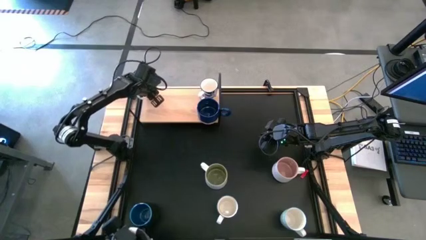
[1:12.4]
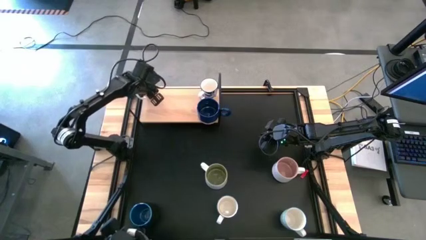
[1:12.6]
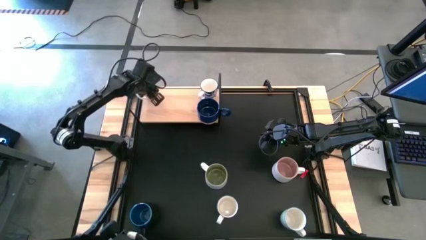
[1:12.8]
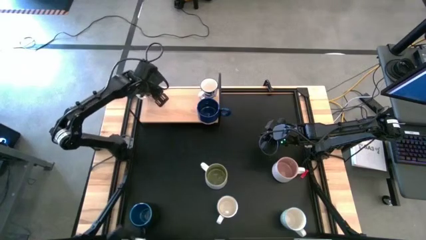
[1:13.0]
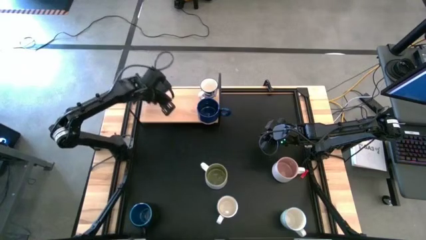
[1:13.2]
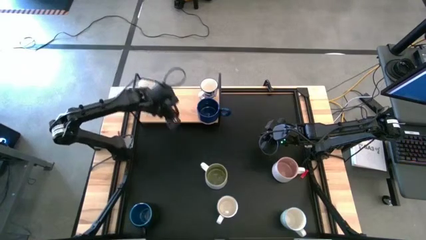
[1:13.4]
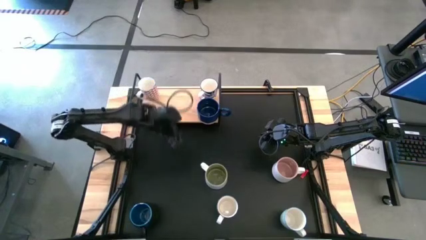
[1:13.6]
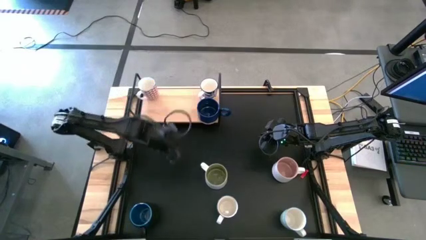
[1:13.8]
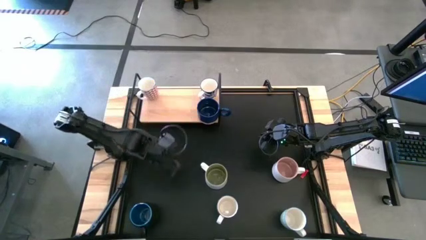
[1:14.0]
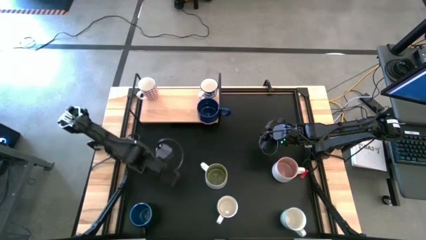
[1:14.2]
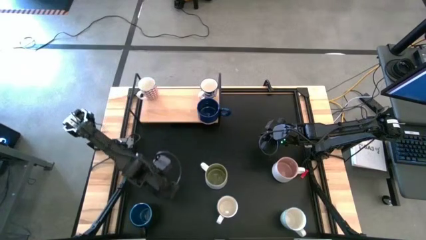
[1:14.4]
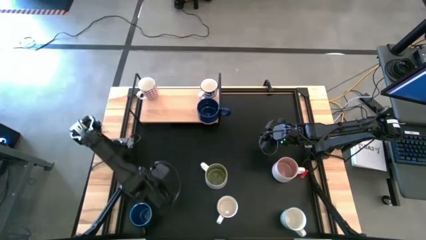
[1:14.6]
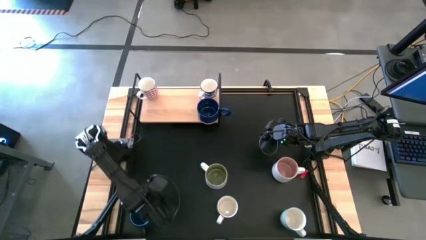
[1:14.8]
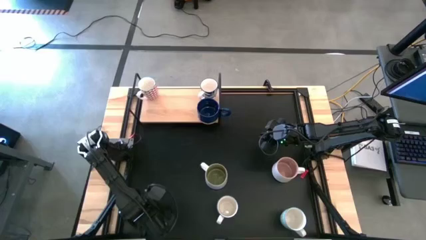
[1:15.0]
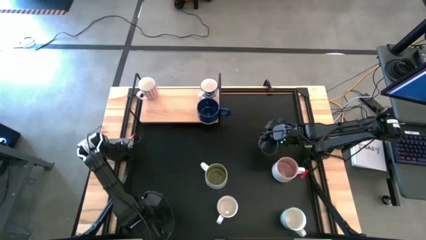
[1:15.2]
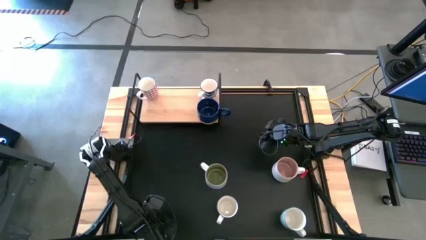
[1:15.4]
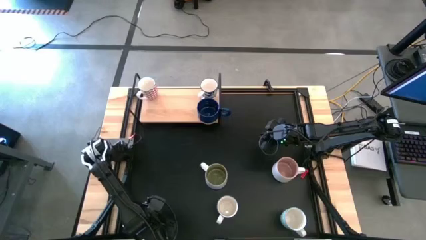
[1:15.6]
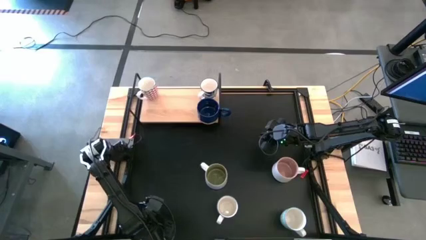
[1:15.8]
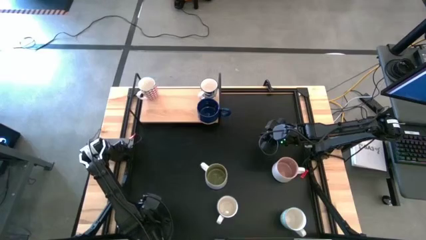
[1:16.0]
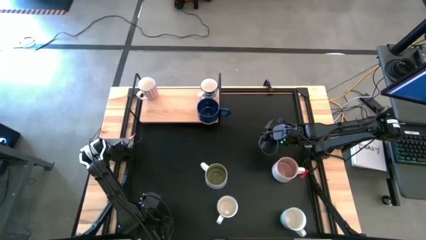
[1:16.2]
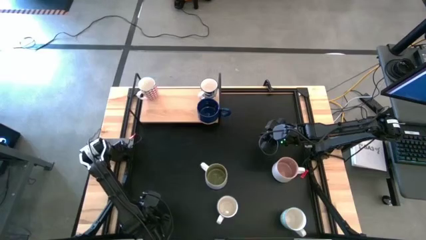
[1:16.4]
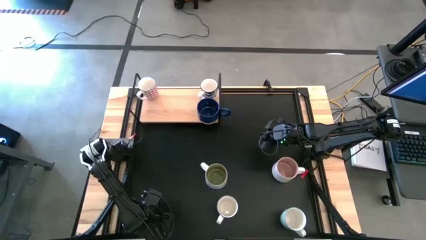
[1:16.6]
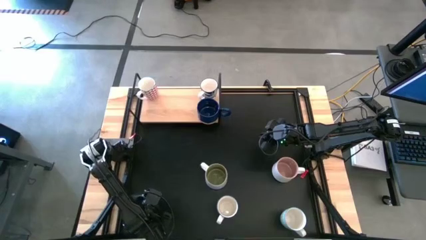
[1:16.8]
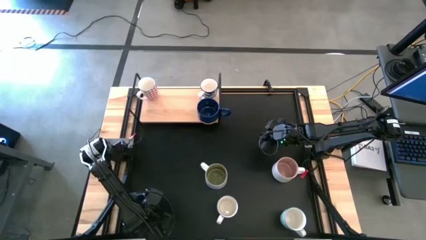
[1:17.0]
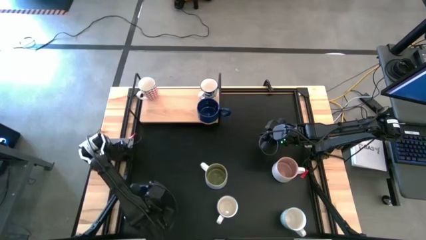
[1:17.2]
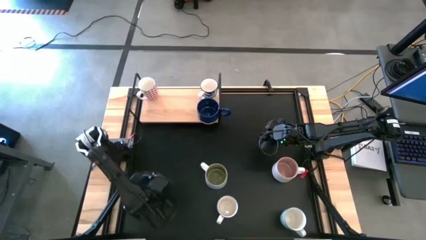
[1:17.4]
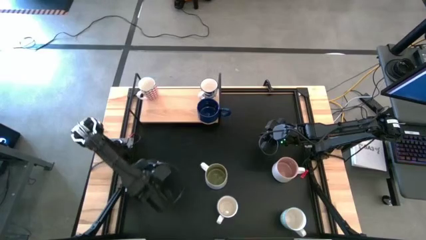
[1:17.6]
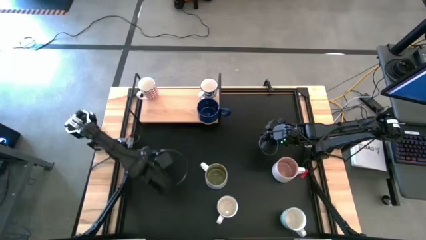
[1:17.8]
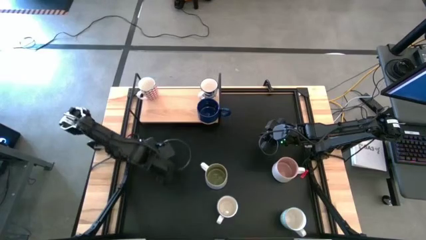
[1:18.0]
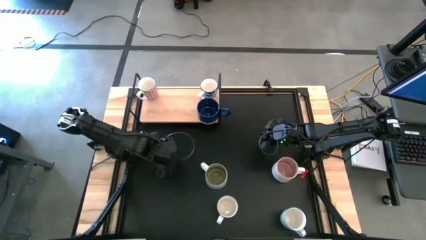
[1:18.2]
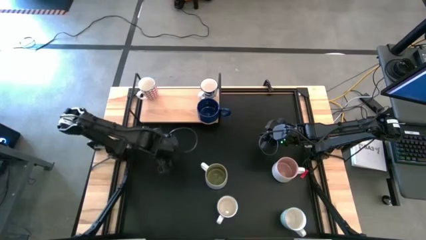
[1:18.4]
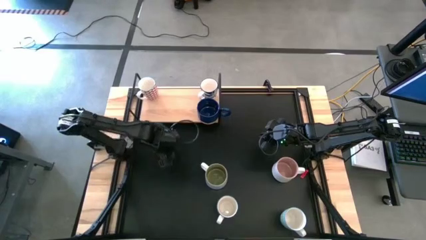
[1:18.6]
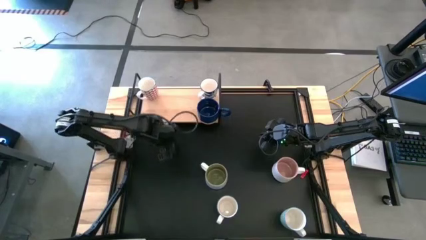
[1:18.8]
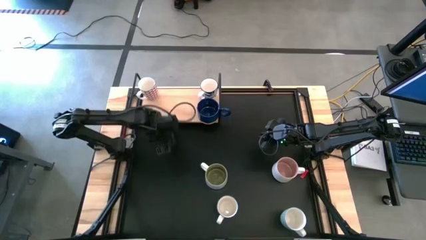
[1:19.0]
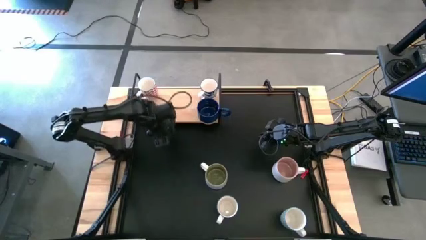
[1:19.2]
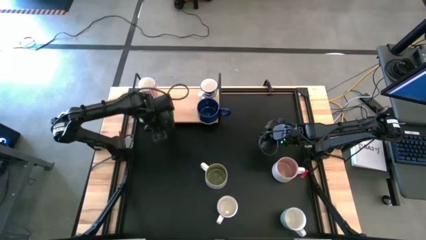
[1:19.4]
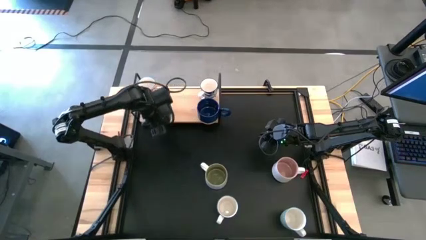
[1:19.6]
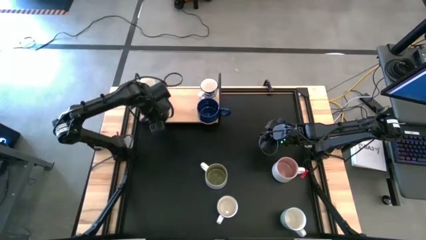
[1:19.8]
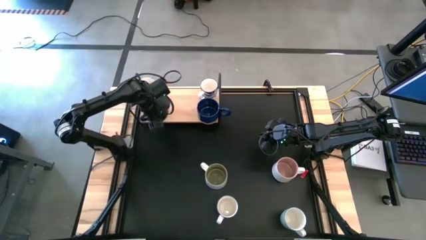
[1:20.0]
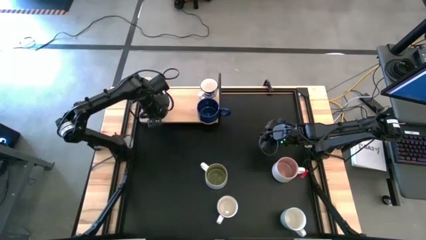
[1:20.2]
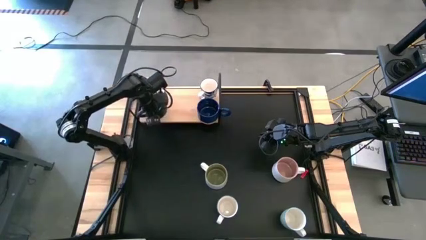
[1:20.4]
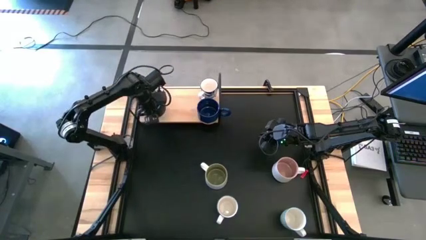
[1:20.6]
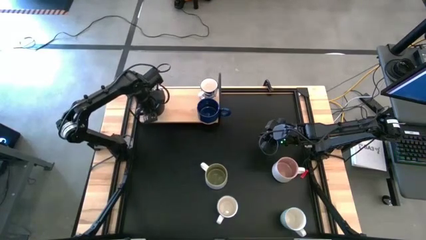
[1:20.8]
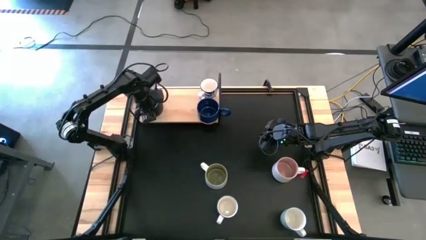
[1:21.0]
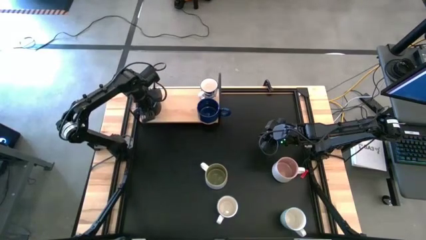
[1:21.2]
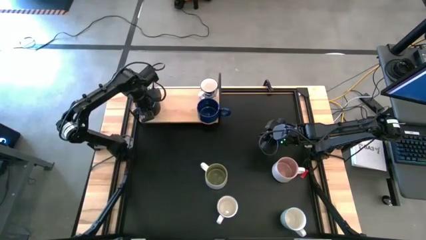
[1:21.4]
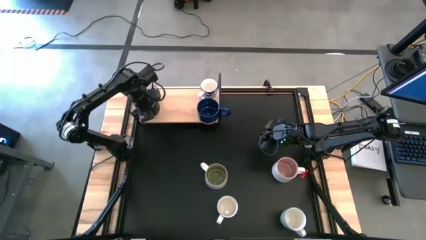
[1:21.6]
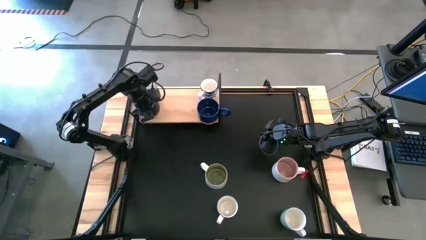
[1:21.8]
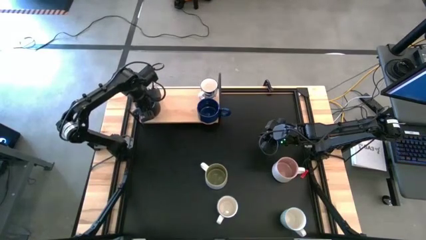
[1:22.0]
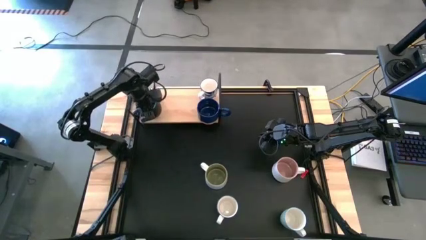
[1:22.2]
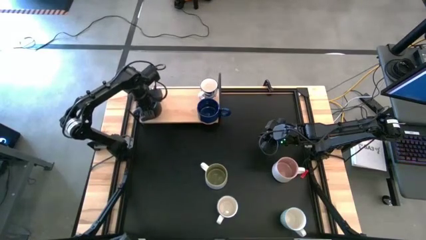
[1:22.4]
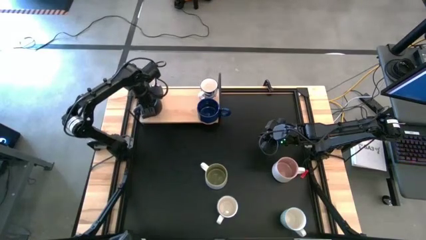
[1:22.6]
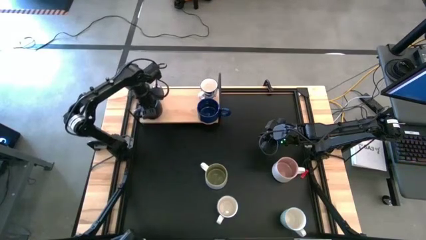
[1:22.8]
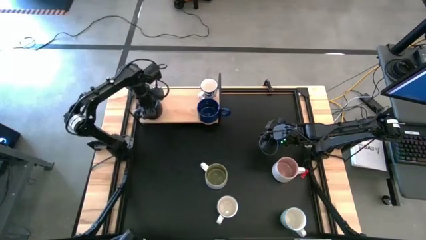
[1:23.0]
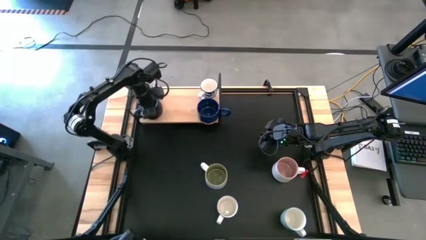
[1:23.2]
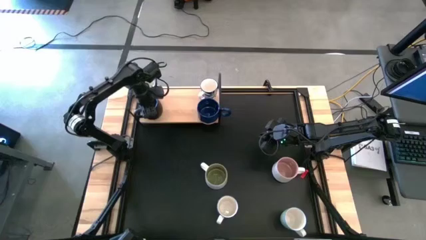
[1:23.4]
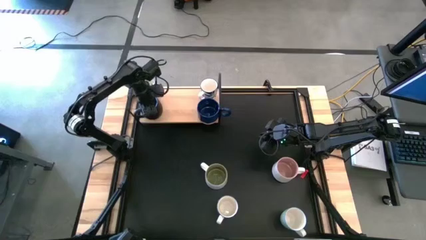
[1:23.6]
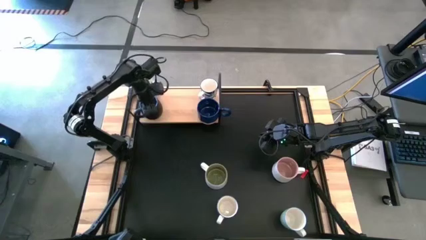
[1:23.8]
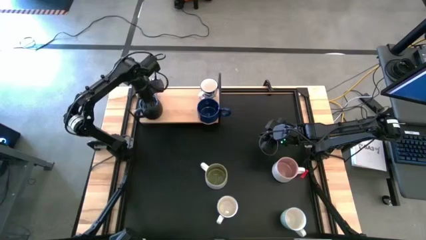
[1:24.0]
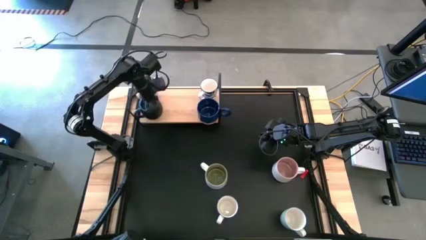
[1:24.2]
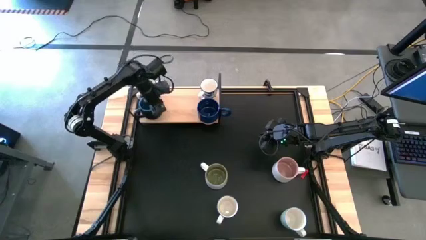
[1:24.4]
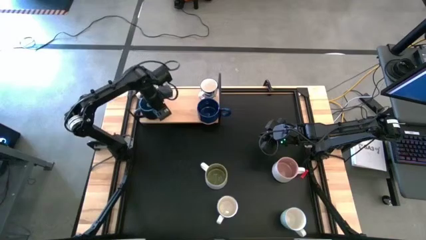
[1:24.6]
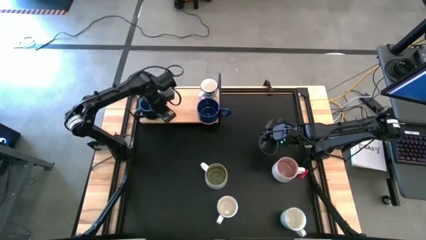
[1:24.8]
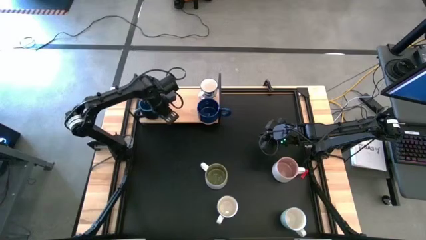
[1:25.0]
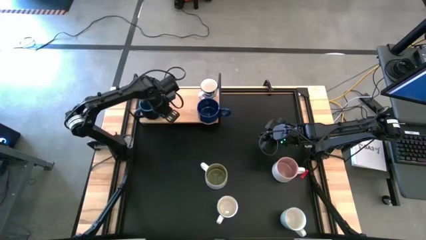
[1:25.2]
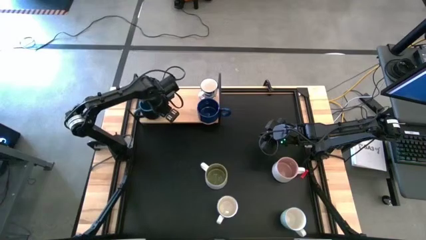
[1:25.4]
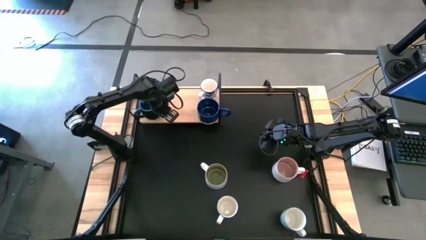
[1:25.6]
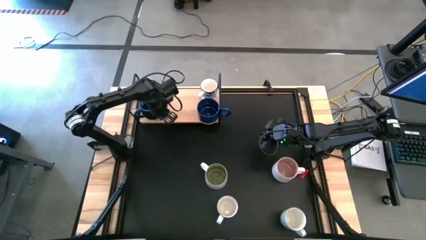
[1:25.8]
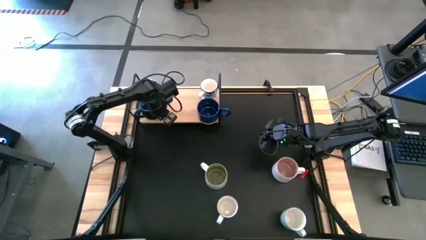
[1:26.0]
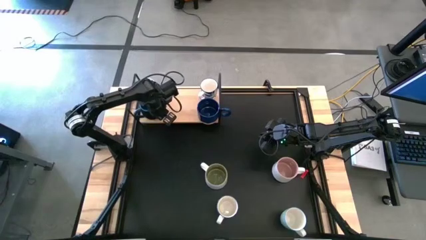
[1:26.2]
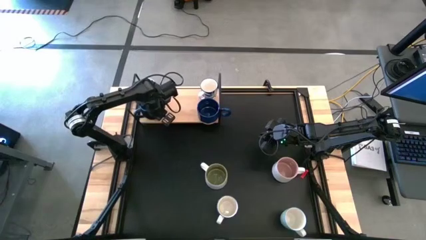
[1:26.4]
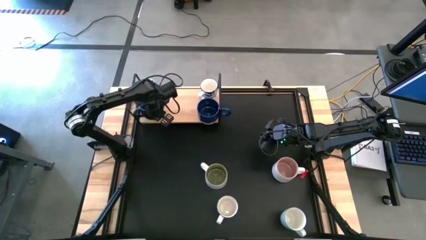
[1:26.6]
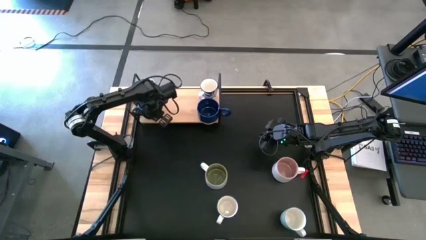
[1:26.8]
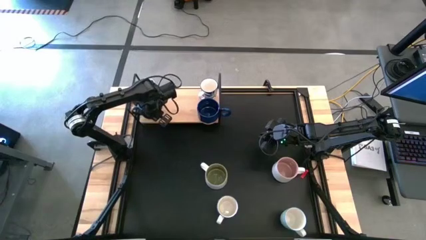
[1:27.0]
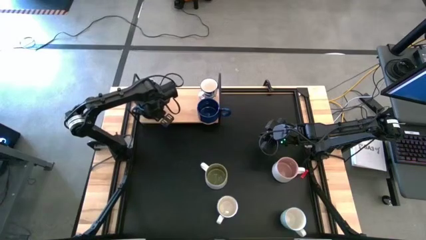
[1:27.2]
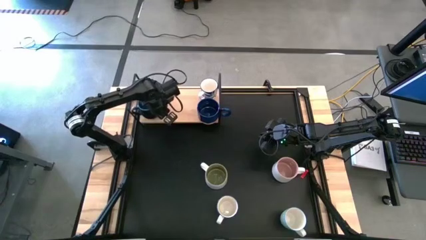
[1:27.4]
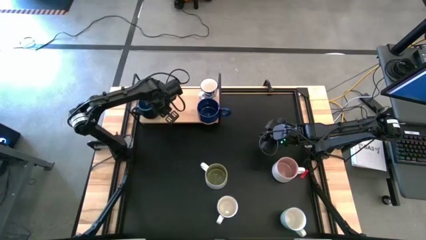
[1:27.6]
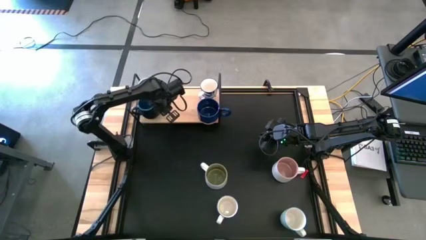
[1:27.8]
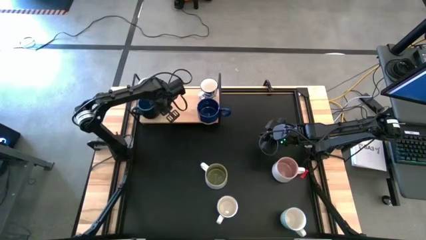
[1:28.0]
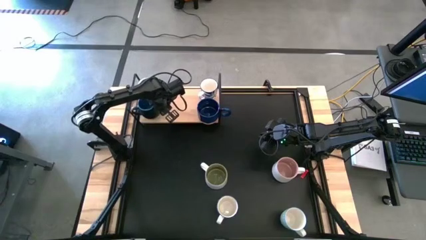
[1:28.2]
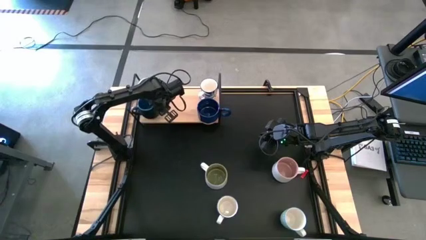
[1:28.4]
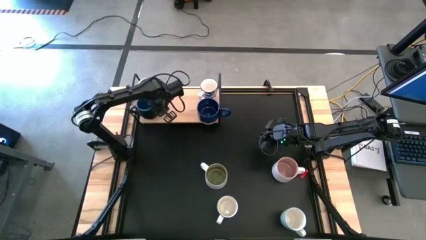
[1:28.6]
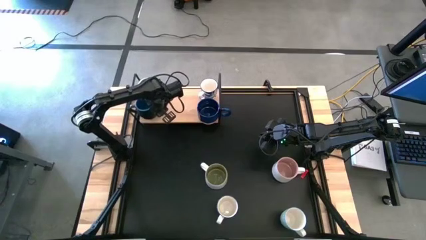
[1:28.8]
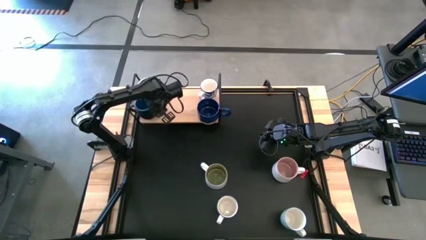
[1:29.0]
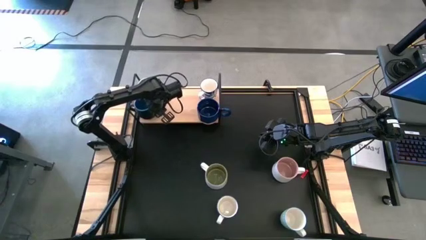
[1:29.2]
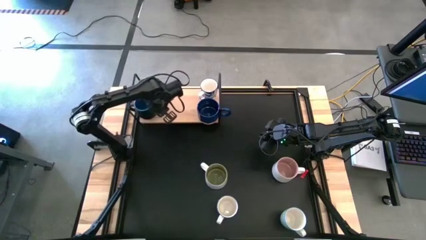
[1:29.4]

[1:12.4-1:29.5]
Task: Place coffee mugs
Put the blue-black mug on the shelf
